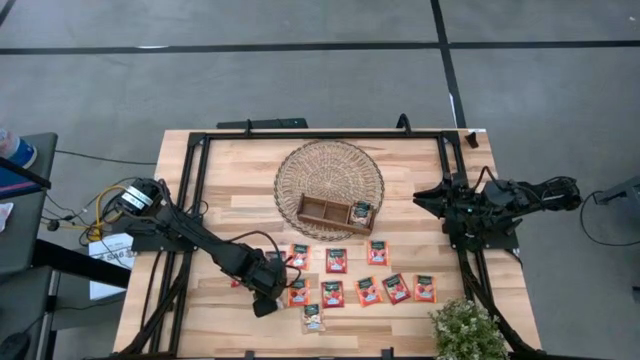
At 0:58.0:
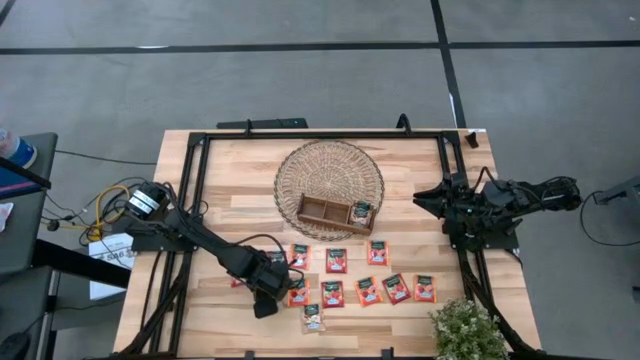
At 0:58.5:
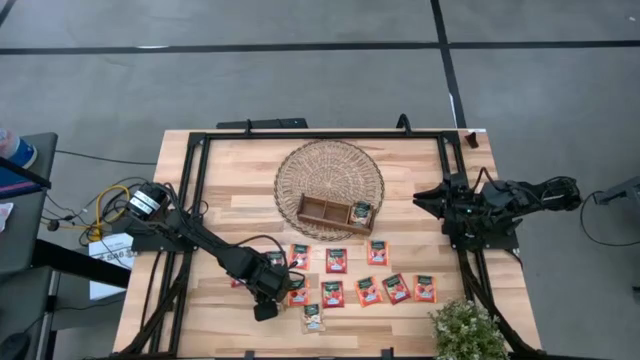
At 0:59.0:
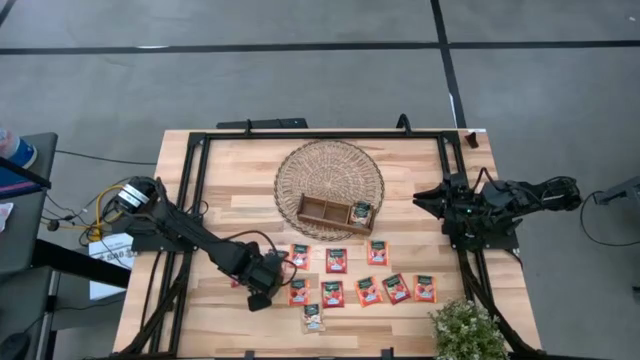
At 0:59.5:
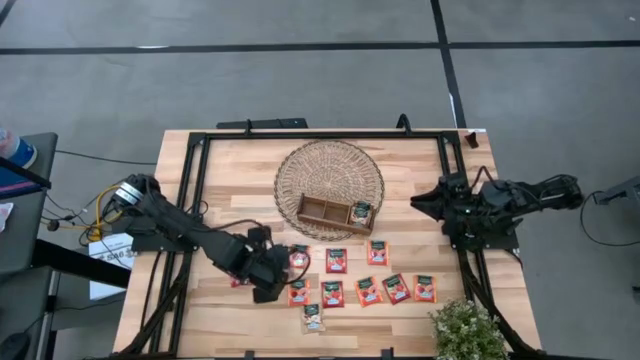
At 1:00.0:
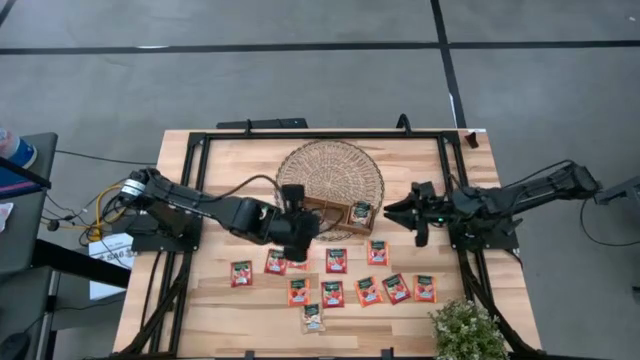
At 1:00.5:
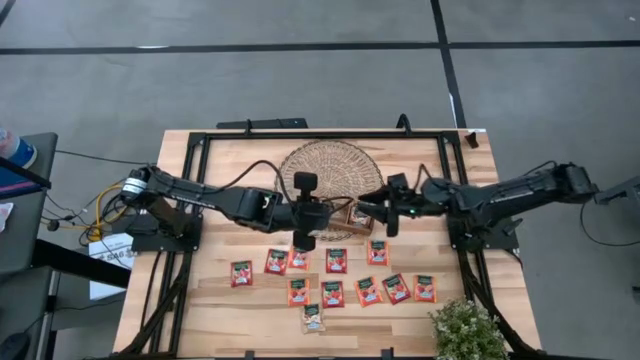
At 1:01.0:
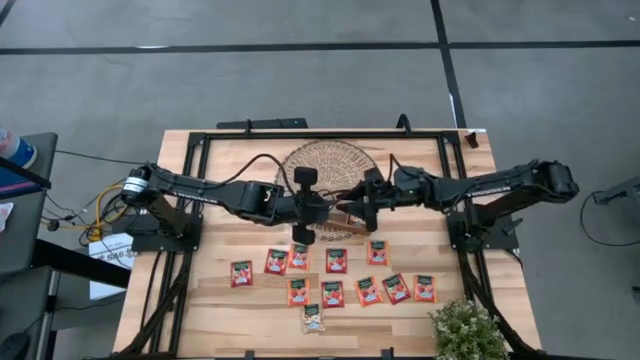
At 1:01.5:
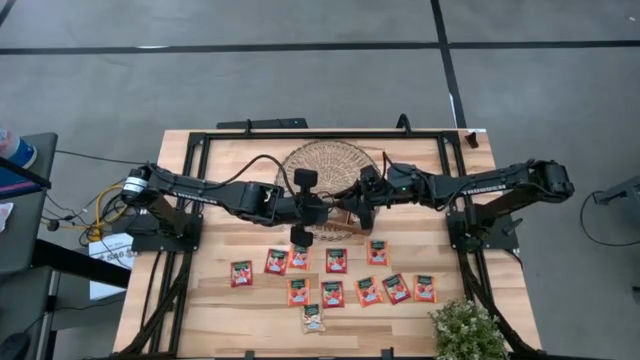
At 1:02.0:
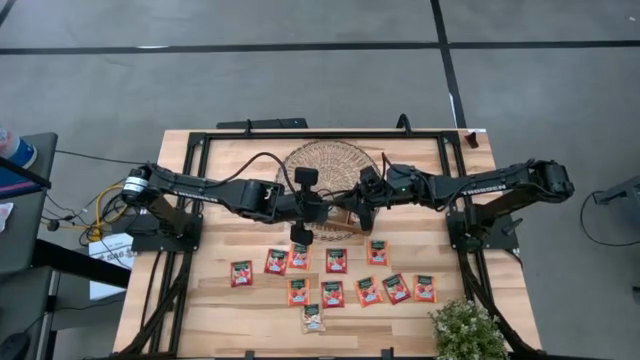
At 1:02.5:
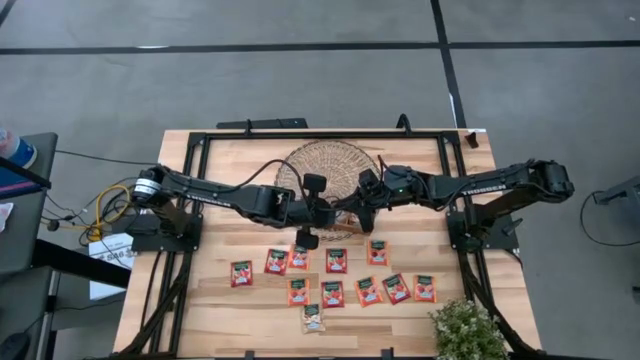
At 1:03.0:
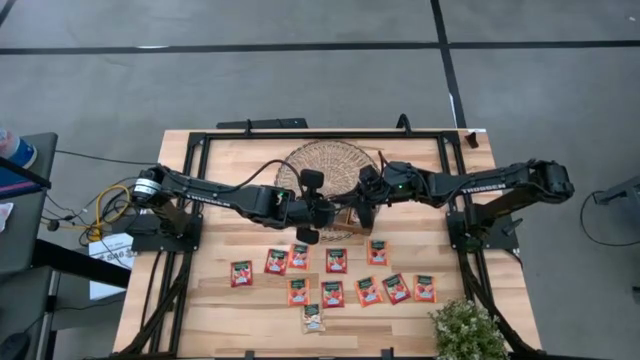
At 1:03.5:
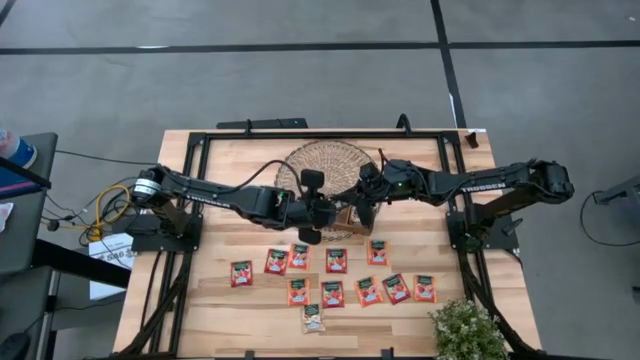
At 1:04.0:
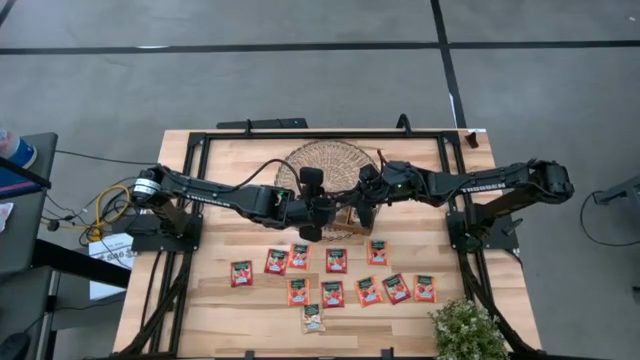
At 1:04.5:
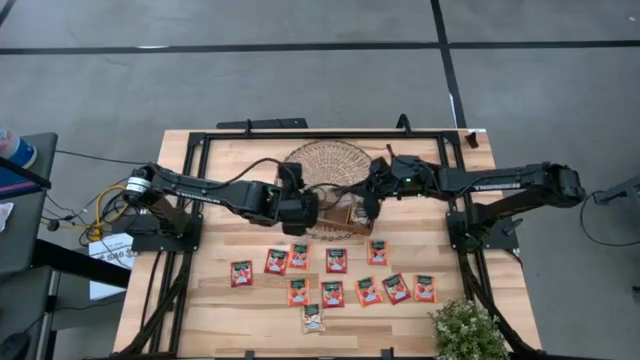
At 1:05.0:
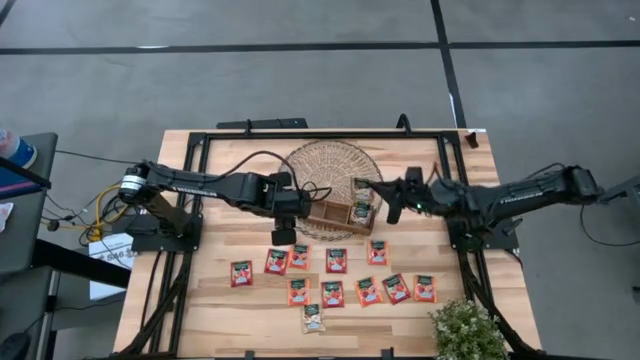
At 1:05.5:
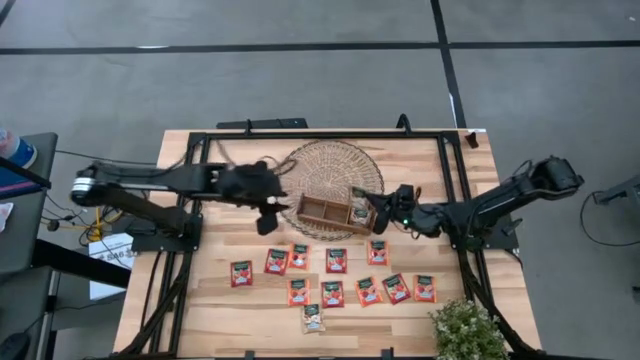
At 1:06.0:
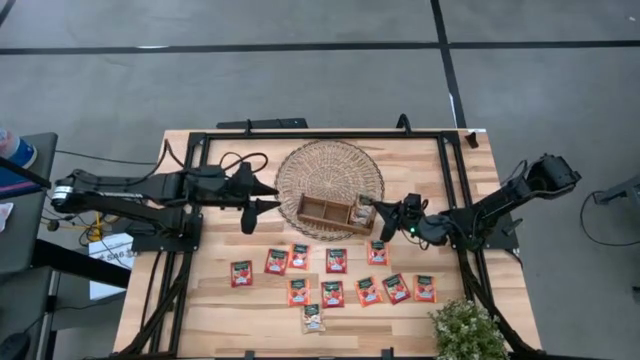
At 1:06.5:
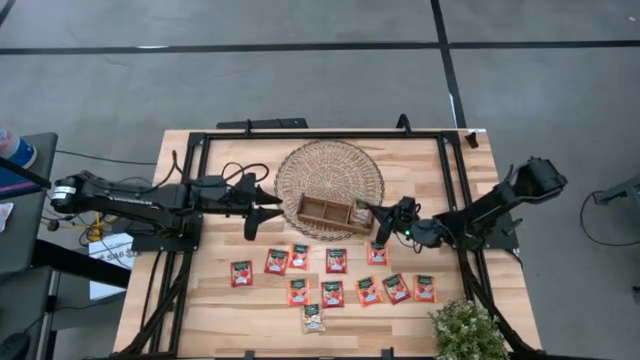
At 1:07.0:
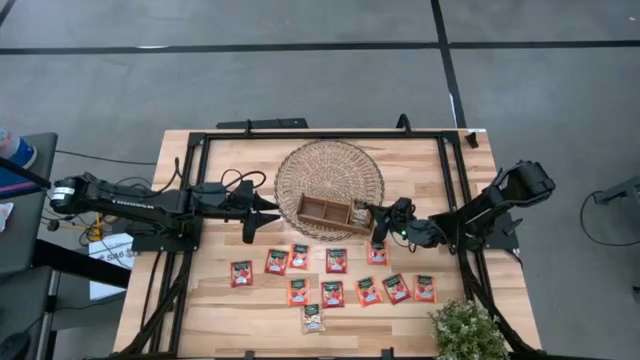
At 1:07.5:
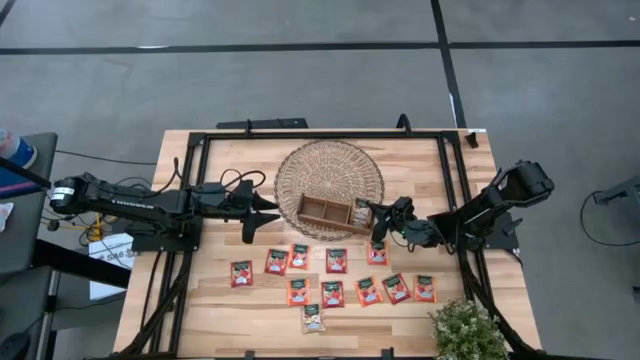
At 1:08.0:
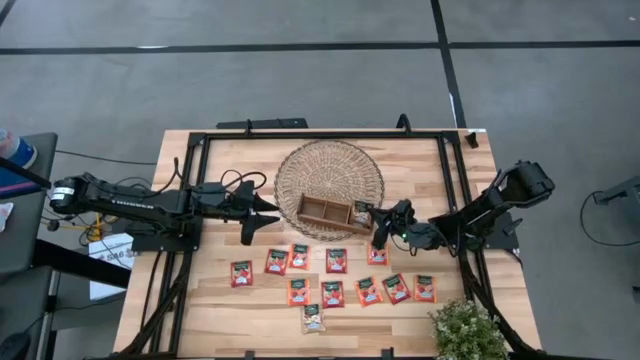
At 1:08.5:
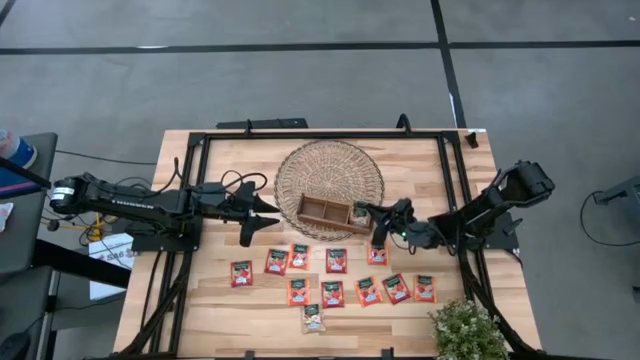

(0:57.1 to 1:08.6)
Task: Pick & Place Tea
Put the brown tea bag into the right section of the wooden organizer

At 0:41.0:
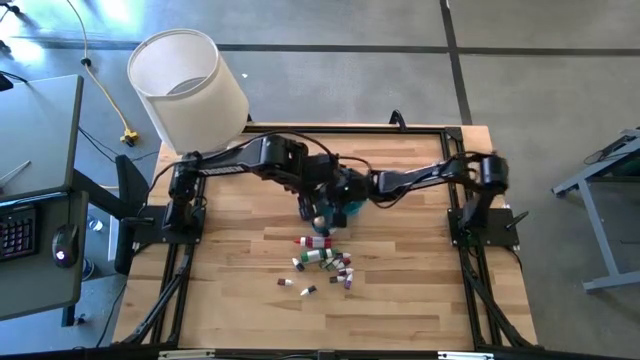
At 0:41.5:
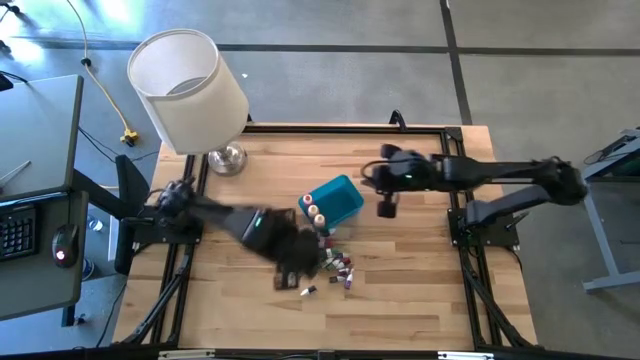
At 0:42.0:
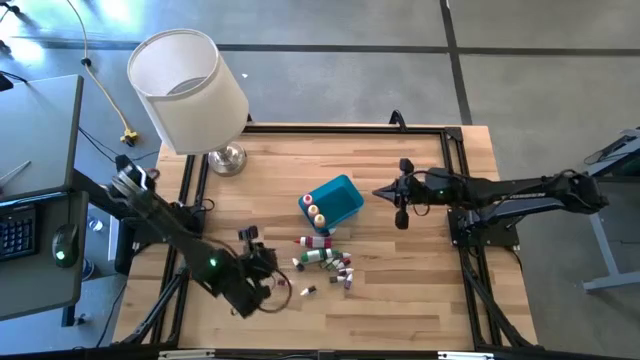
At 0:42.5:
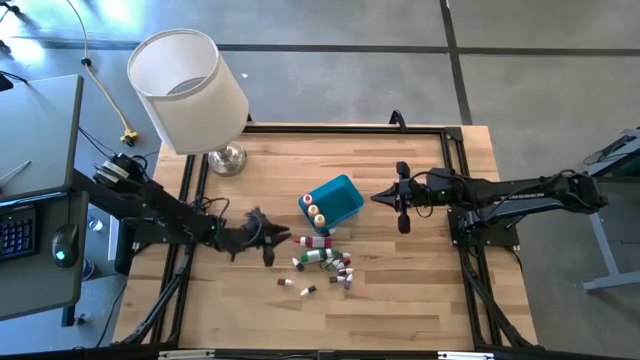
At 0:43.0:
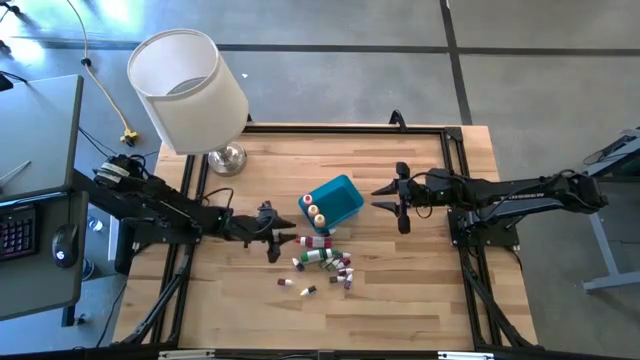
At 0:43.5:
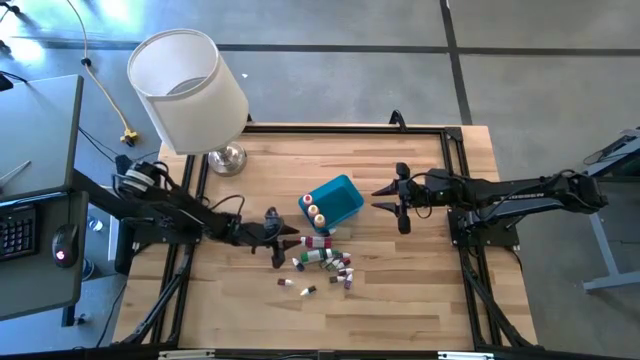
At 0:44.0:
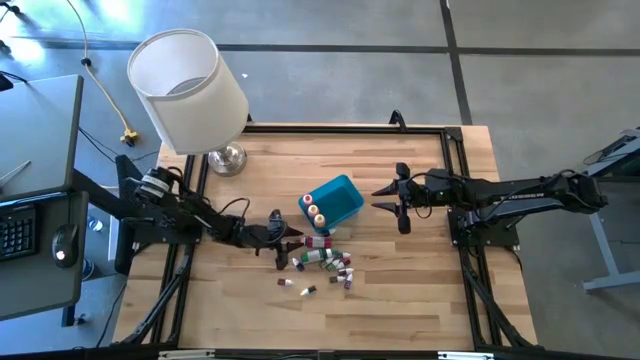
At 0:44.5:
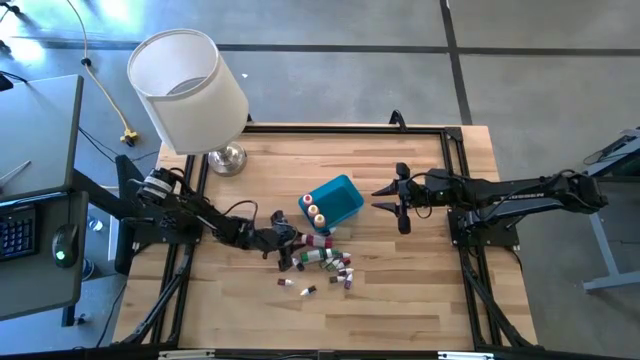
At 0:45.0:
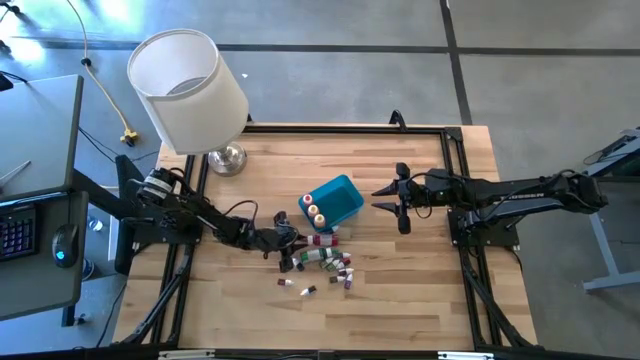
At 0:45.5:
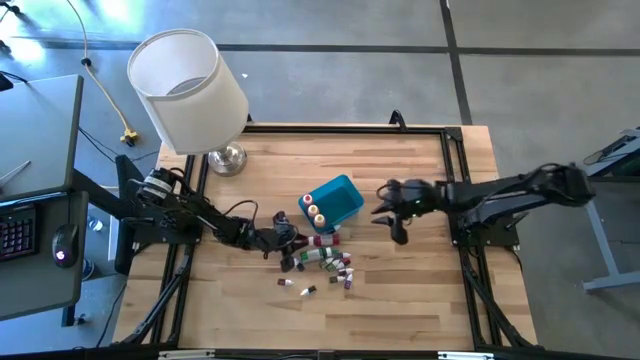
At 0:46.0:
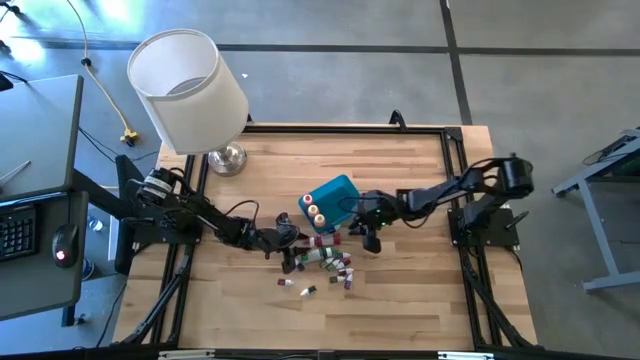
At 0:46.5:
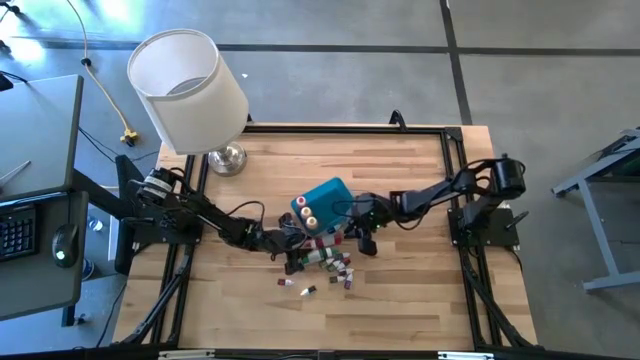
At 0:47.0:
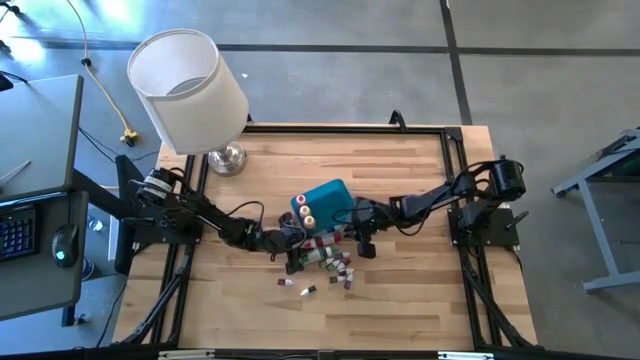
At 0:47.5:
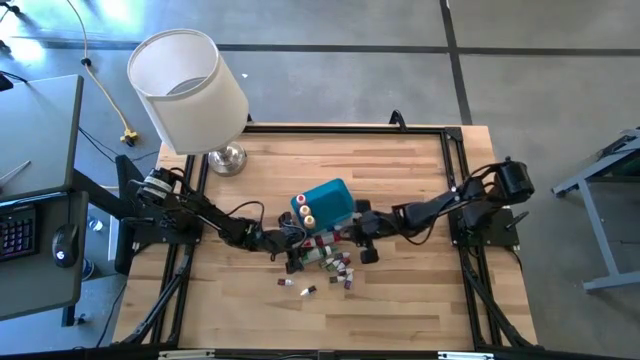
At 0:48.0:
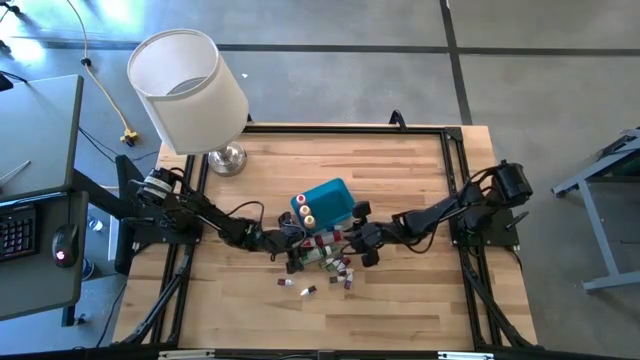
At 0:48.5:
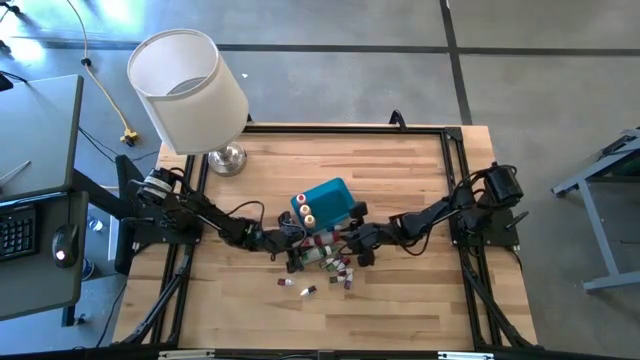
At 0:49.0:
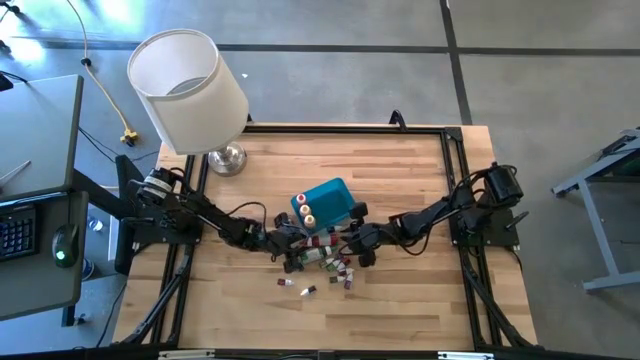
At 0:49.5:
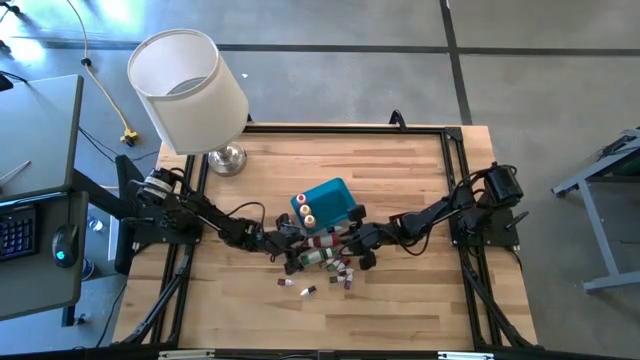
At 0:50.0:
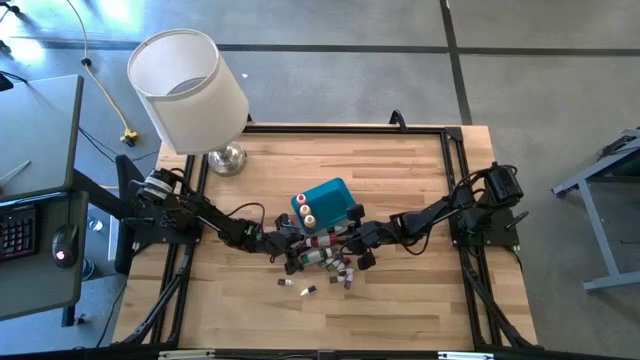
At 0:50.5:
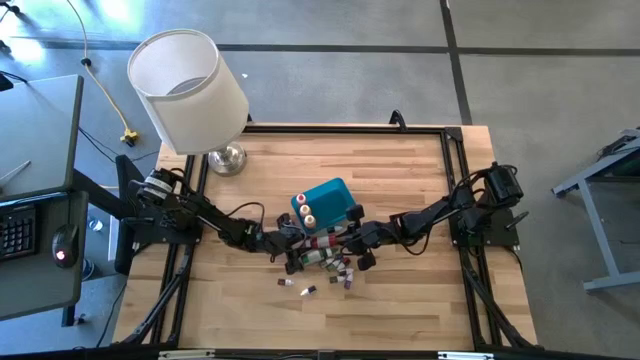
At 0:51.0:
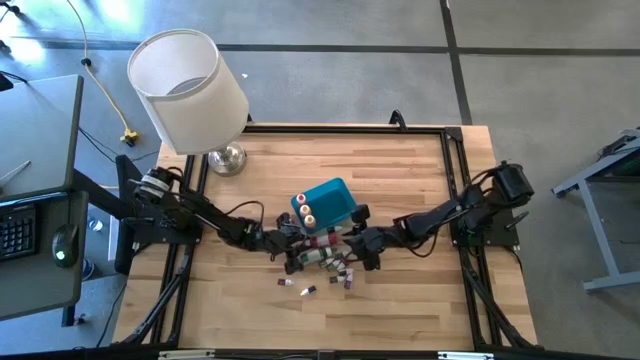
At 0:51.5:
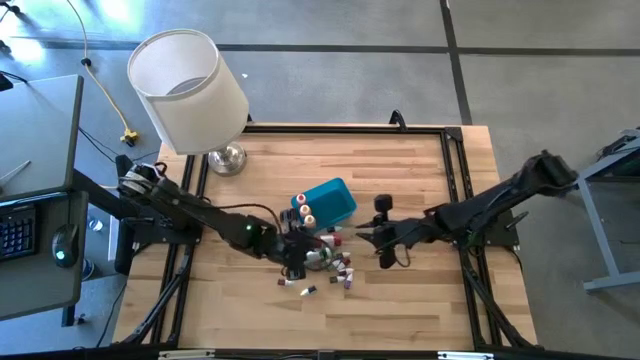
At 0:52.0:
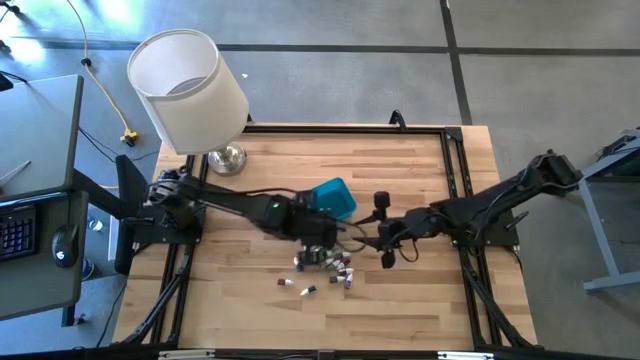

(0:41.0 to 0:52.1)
Task: Pick & Place food coloring
Put the large red food coloring bottle into the bin
